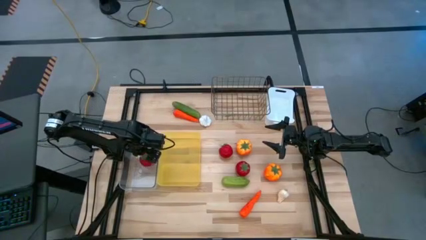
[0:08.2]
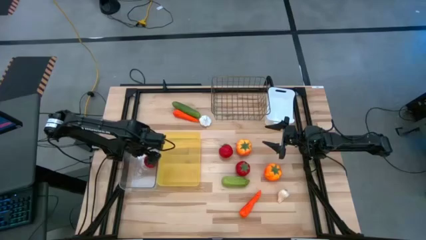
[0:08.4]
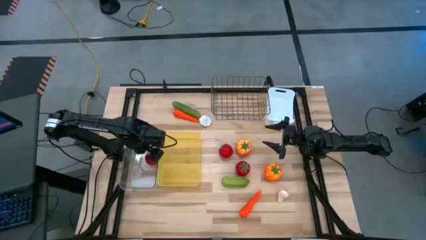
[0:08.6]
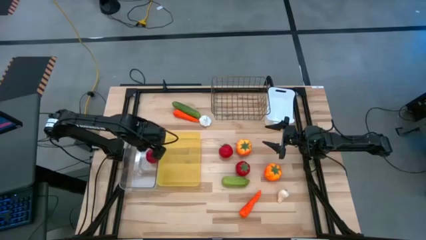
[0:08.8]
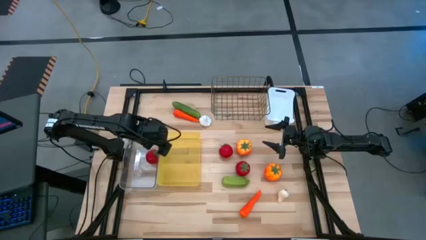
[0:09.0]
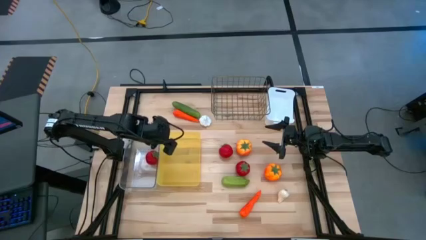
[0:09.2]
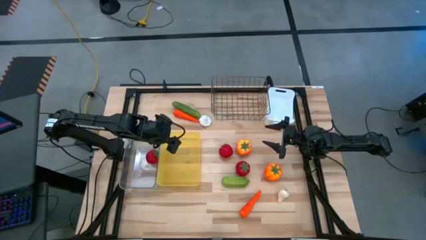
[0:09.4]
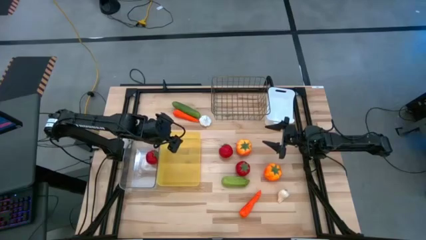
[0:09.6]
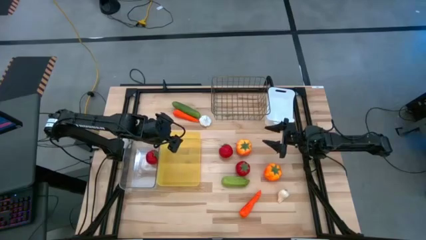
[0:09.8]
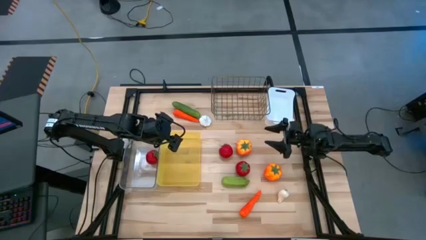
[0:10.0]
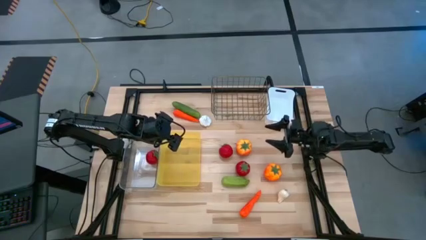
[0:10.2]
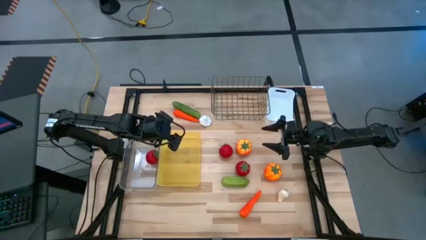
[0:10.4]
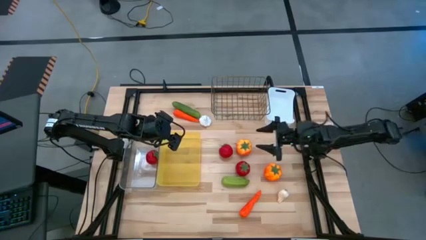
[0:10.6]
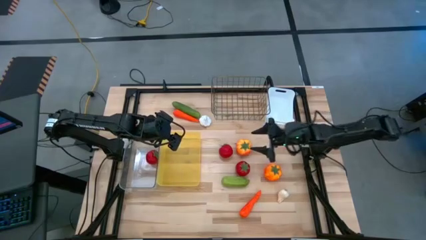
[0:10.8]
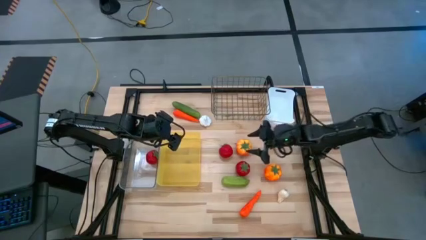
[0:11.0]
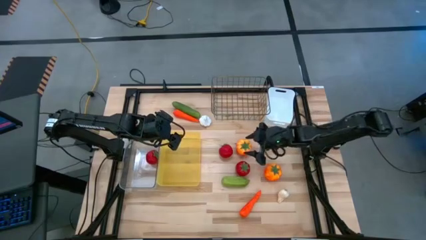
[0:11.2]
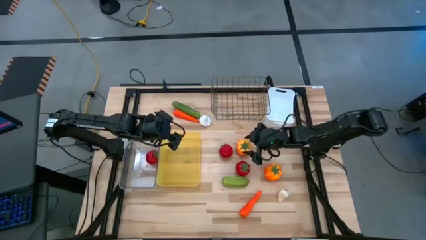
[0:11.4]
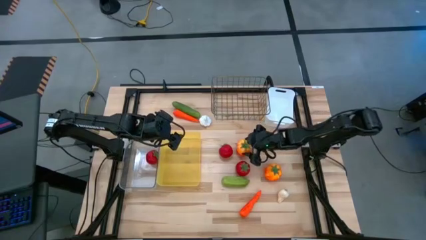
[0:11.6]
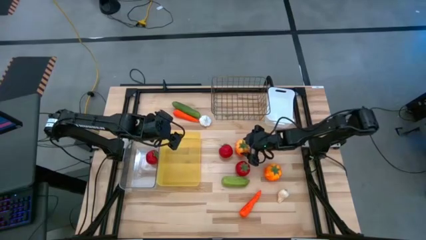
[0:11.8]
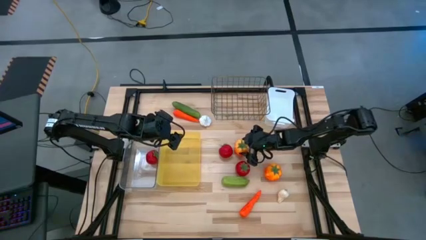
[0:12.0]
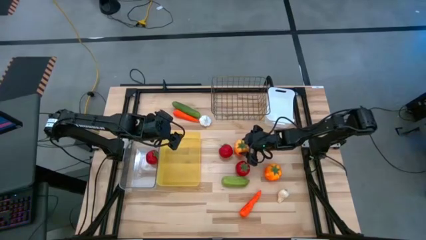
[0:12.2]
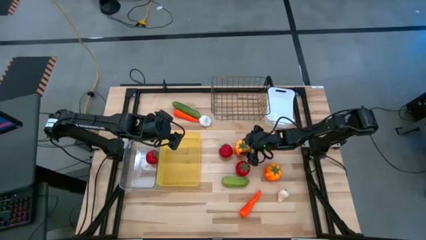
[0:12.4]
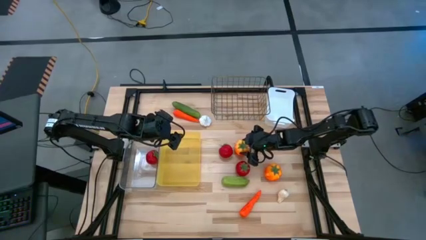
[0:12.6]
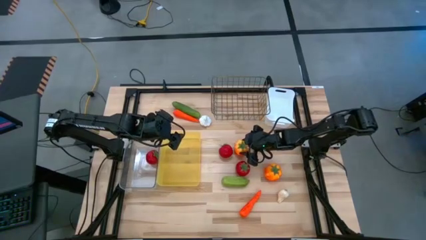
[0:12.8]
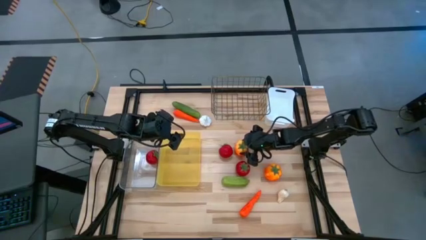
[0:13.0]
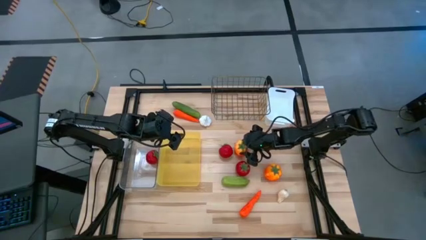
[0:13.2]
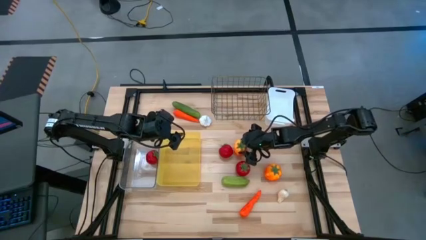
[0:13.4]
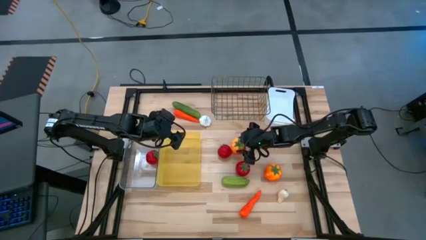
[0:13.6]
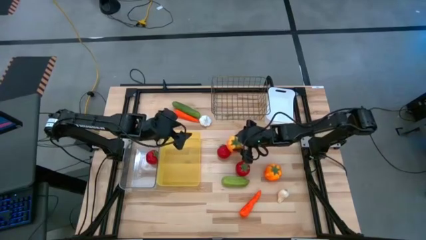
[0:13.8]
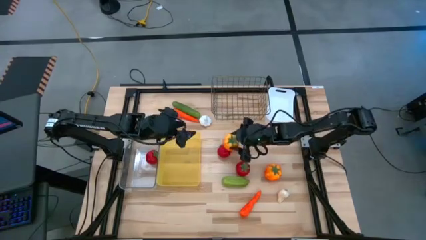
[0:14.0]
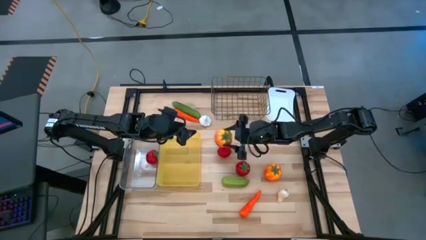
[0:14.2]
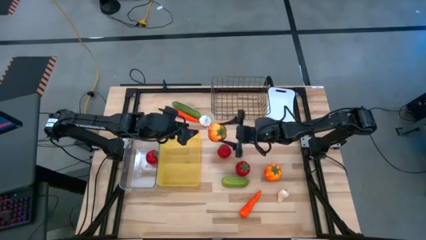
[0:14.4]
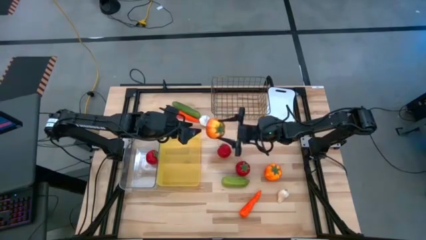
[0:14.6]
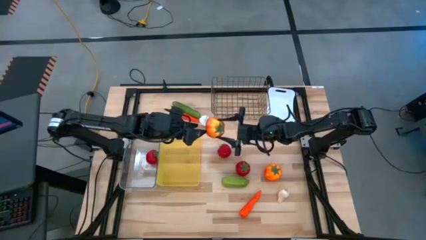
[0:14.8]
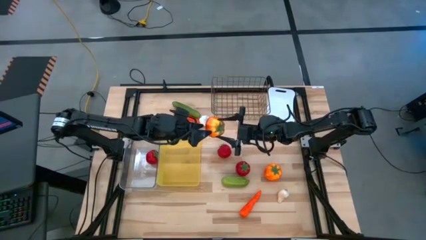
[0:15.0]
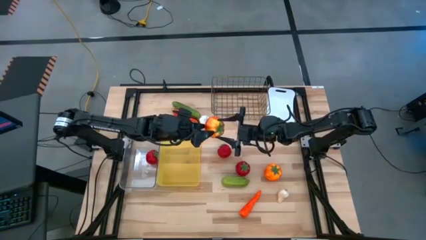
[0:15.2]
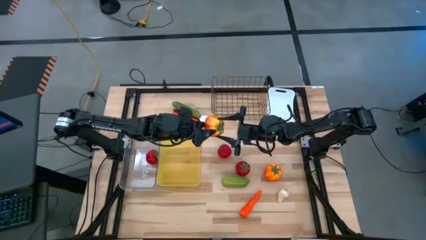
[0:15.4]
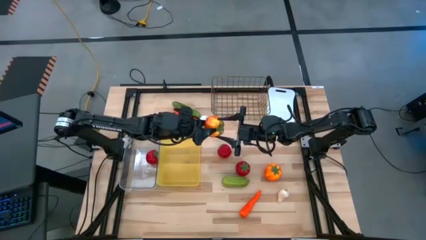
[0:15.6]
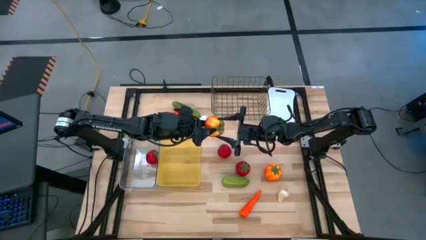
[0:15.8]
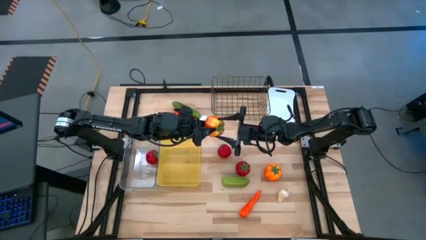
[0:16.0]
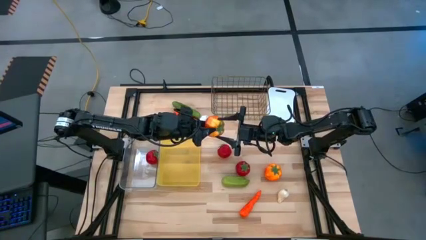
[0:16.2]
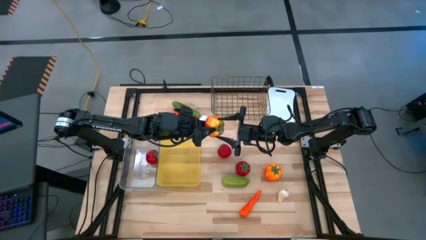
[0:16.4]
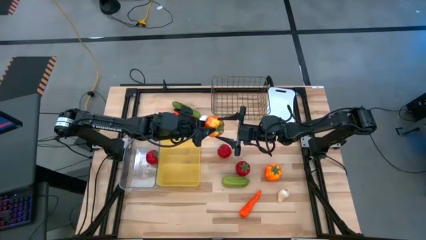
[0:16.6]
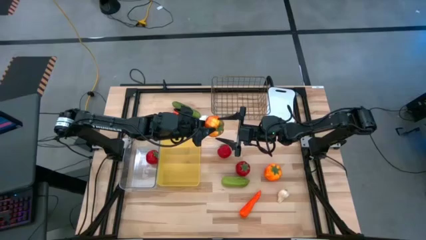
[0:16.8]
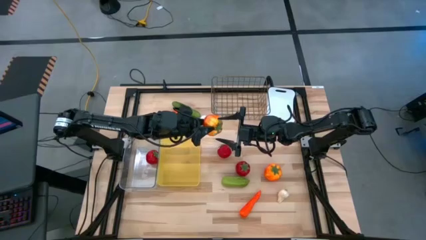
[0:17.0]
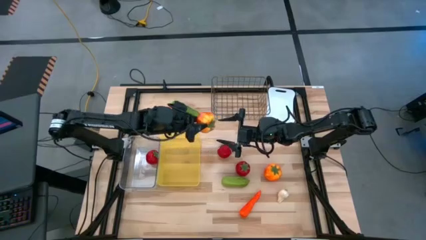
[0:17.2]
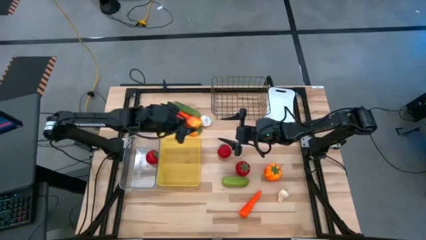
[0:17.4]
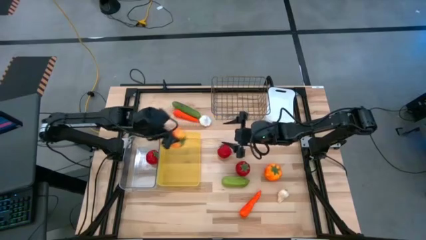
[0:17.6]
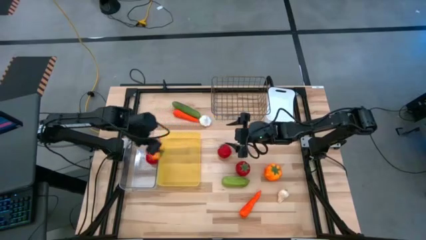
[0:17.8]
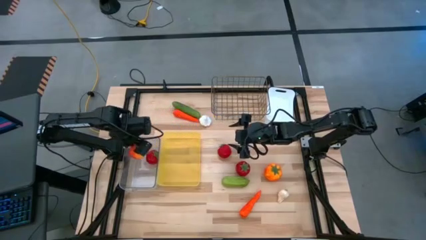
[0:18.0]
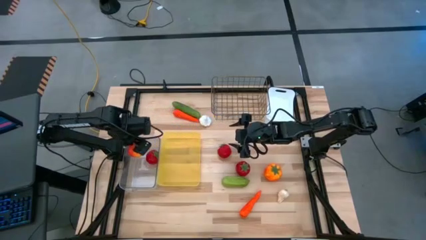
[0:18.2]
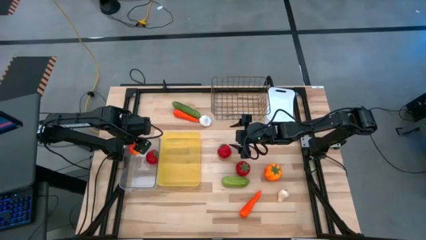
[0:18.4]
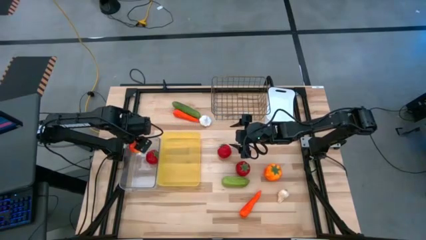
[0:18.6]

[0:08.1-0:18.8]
Task: Sort produce into baskets
Put the left orange tomato into the transparent bin

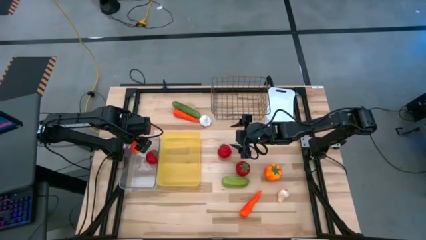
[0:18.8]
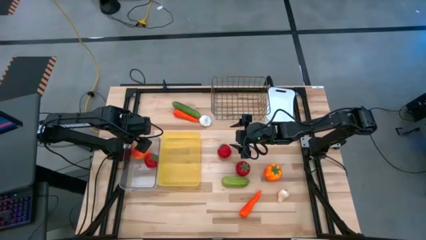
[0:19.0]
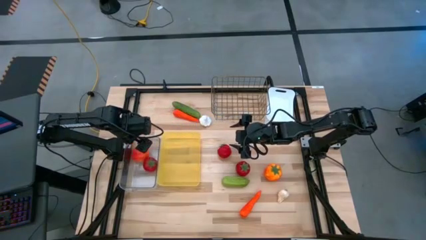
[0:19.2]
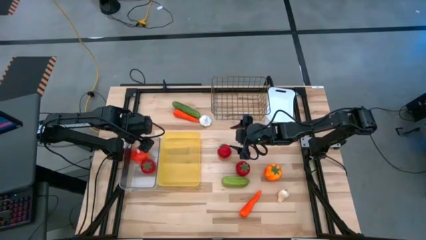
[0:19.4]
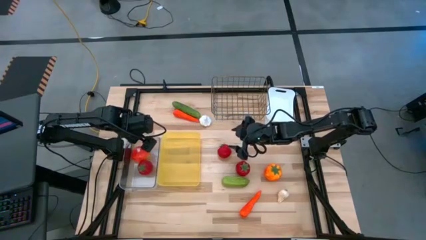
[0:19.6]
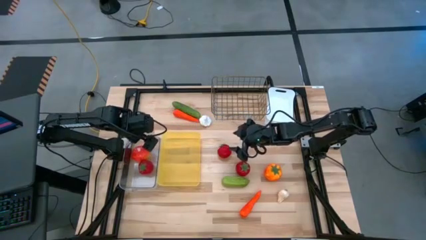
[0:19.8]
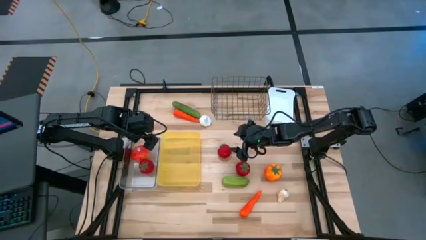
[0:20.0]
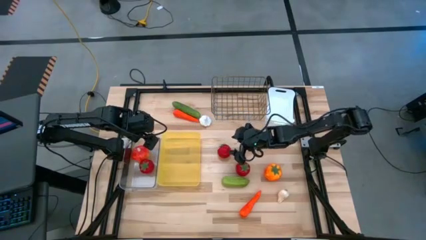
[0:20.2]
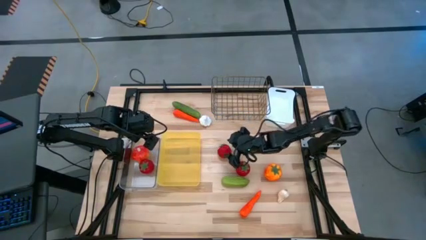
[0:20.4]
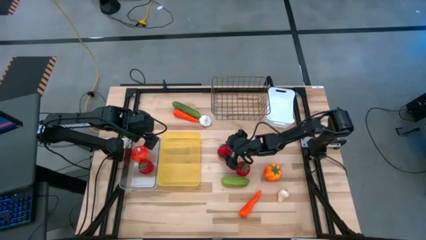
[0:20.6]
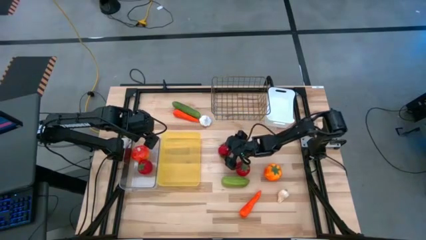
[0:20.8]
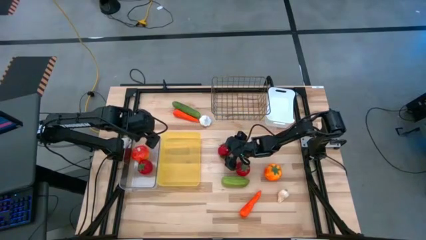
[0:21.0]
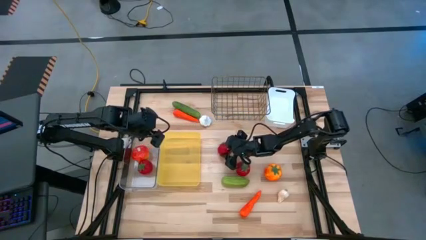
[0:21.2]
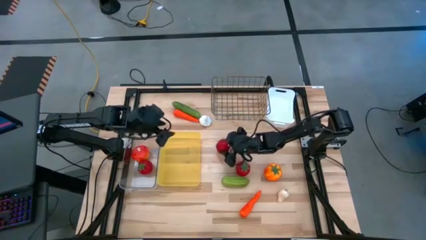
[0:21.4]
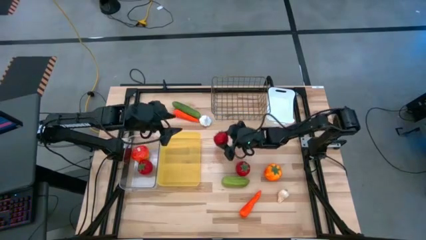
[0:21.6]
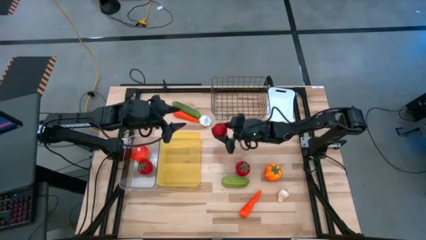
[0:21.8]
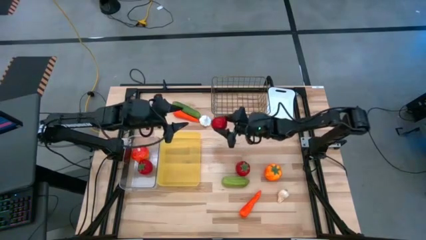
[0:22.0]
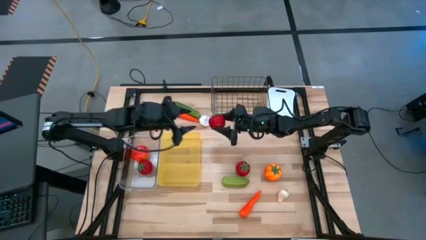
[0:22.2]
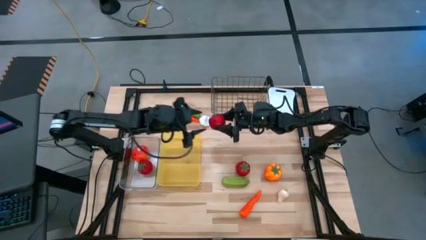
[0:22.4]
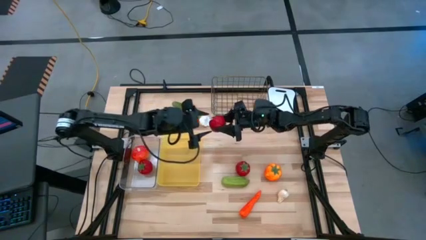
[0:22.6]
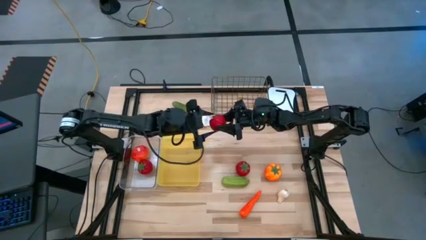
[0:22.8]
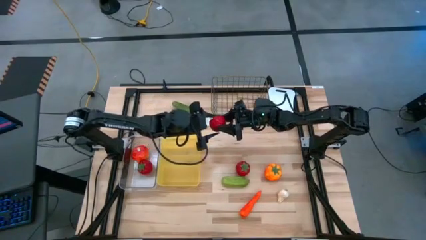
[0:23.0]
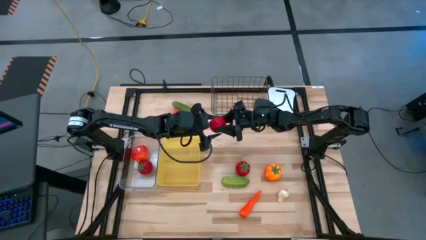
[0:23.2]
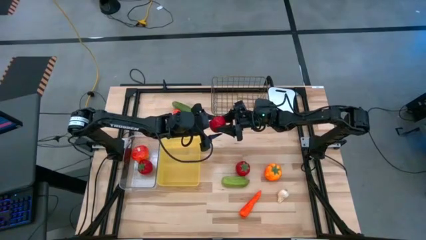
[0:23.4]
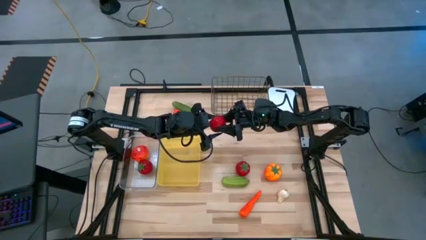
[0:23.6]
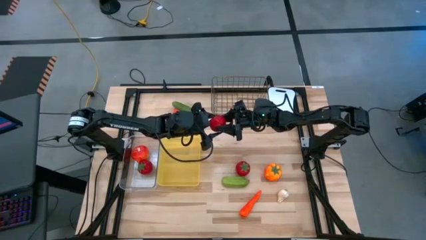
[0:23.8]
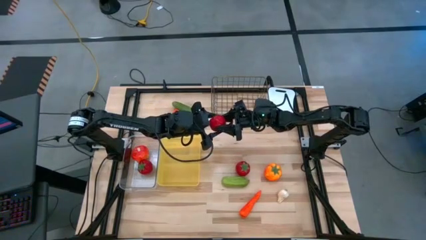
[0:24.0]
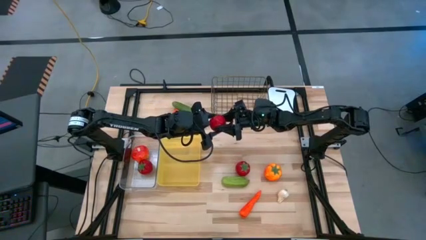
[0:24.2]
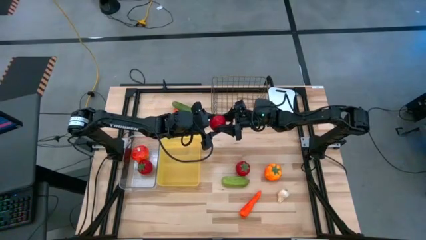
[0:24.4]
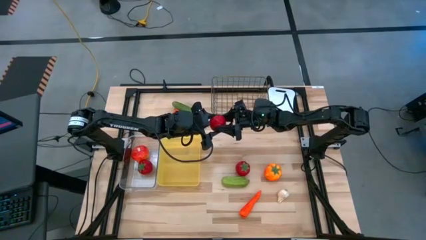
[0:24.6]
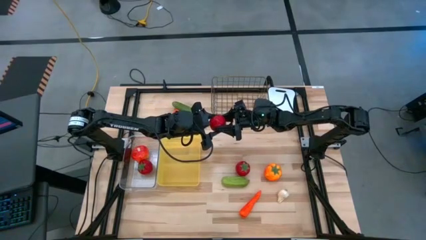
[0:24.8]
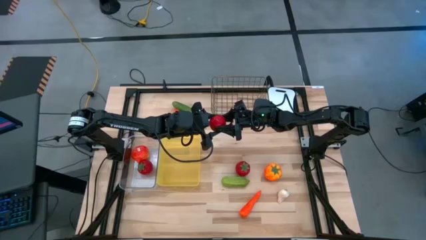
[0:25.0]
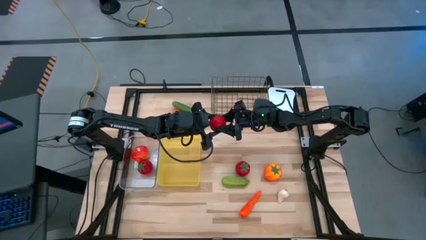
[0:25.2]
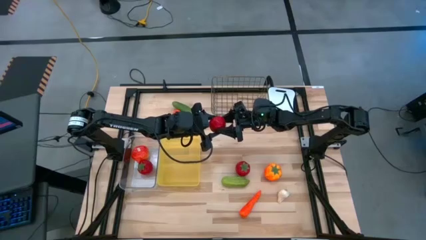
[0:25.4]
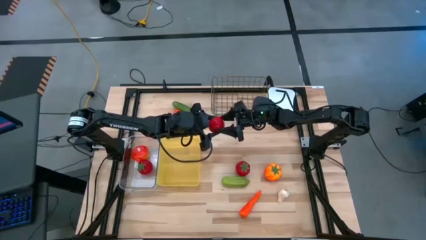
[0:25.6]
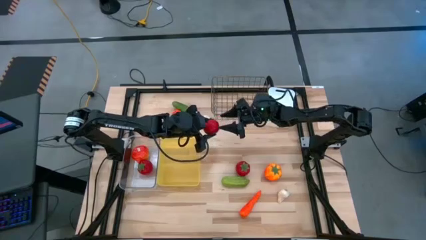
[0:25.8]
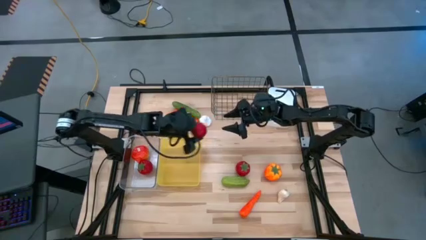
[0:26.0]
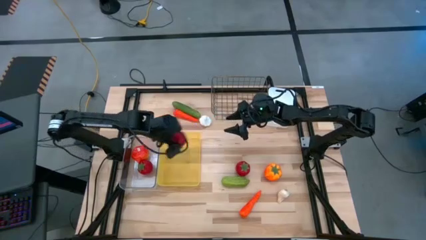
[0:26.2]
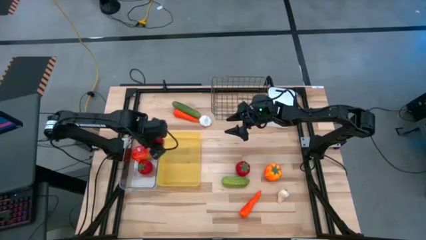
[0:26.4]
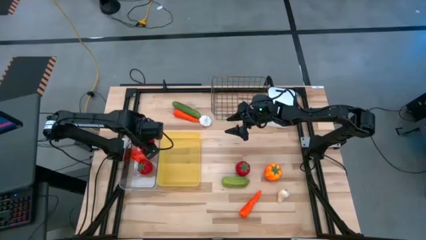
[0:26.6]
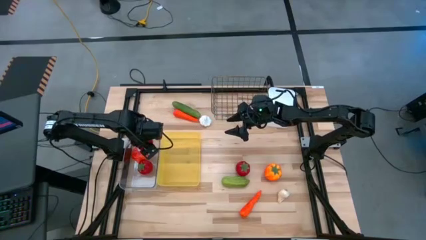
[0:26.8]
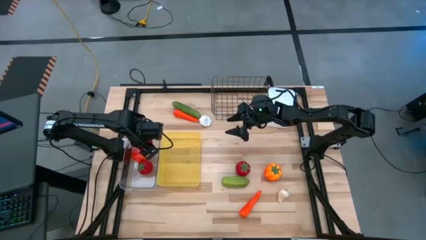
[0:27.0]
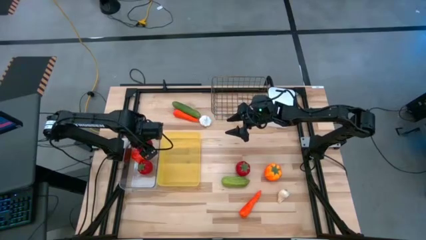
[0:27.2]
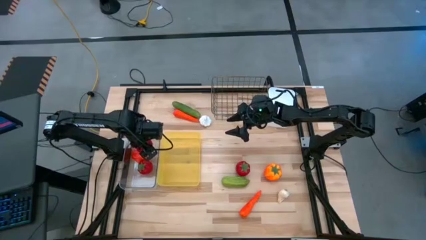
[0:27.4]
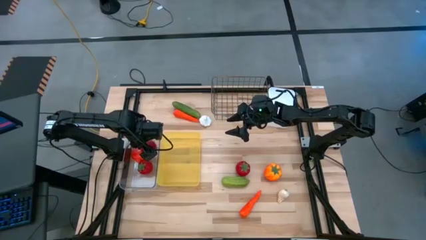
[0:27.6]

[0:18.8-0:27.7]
Put the top red tomato into the transparent bin
